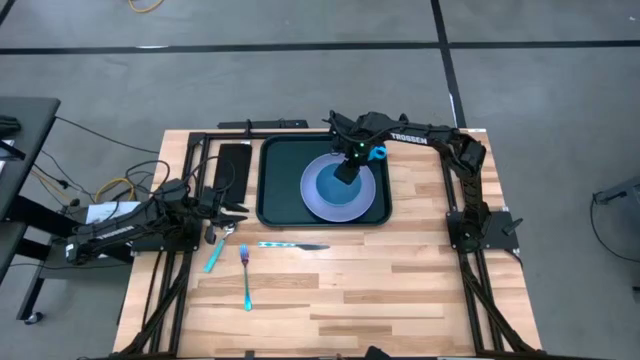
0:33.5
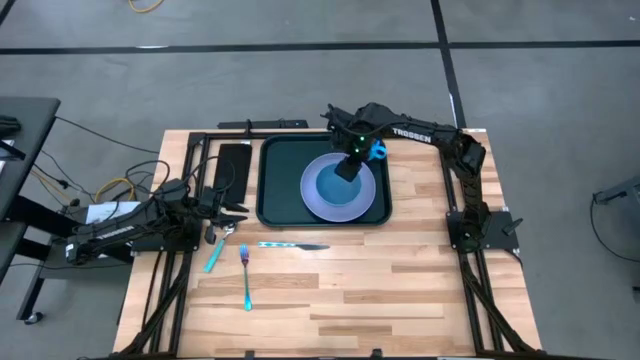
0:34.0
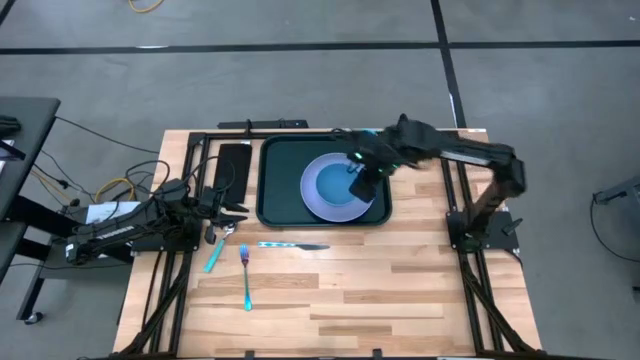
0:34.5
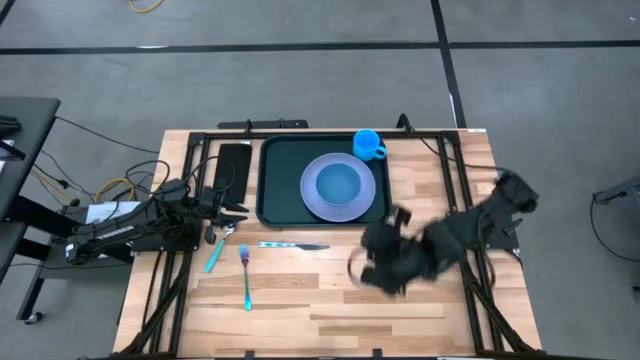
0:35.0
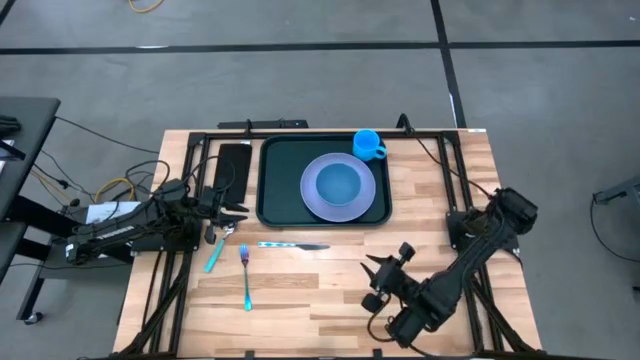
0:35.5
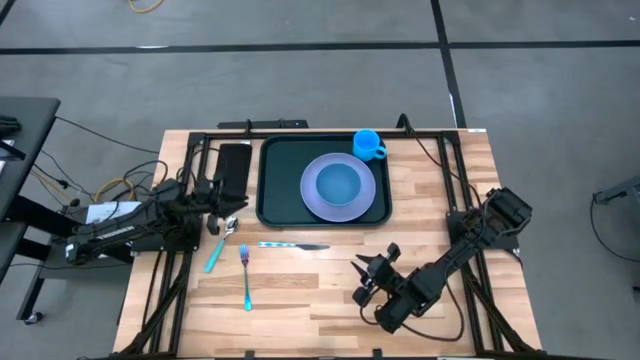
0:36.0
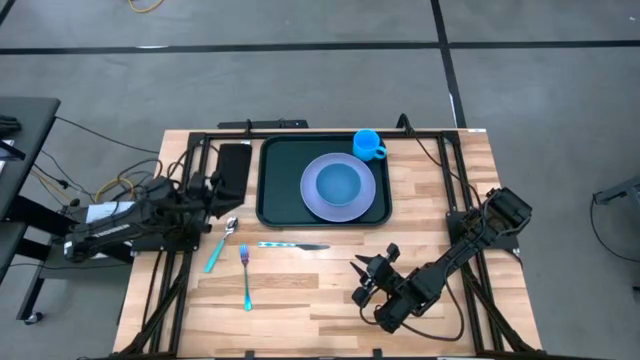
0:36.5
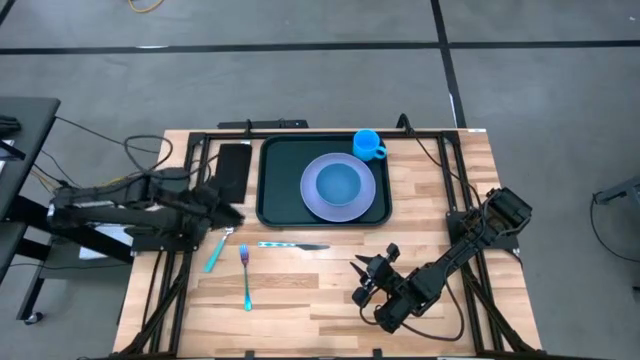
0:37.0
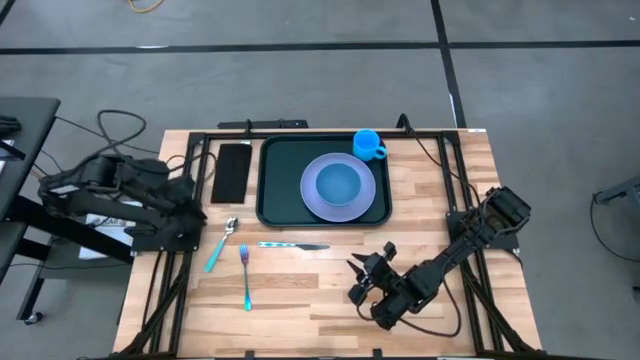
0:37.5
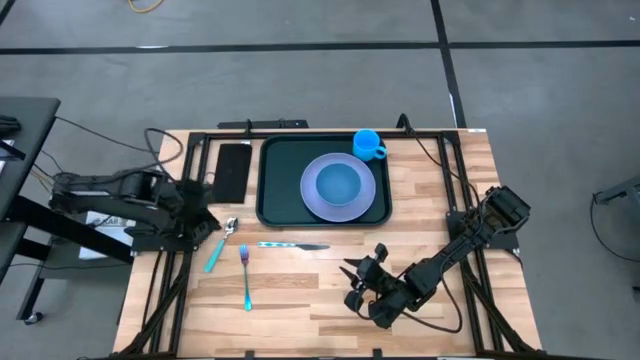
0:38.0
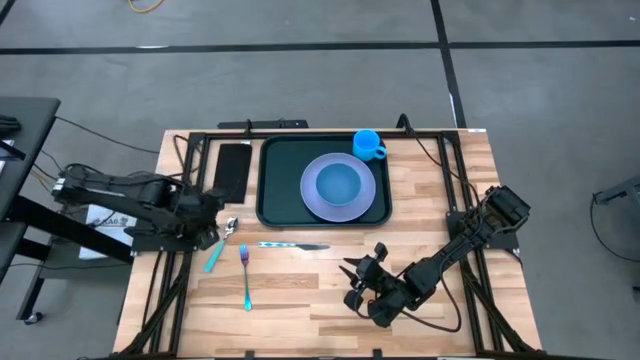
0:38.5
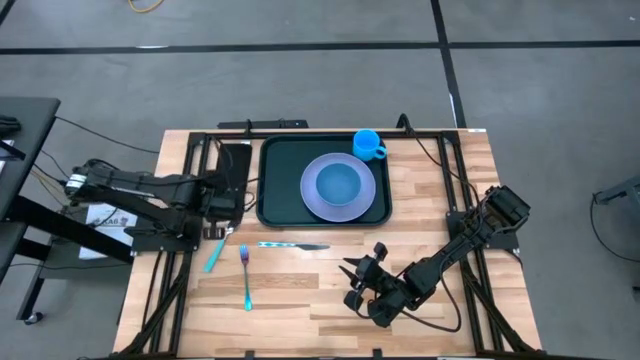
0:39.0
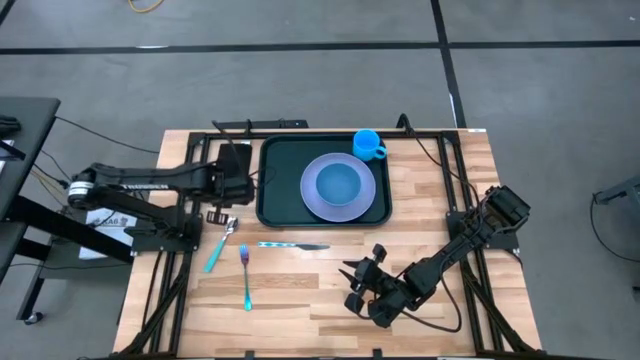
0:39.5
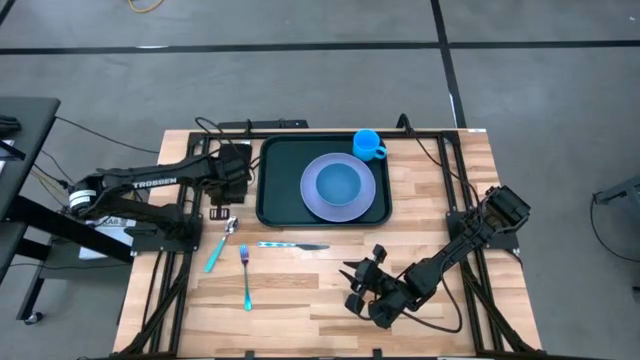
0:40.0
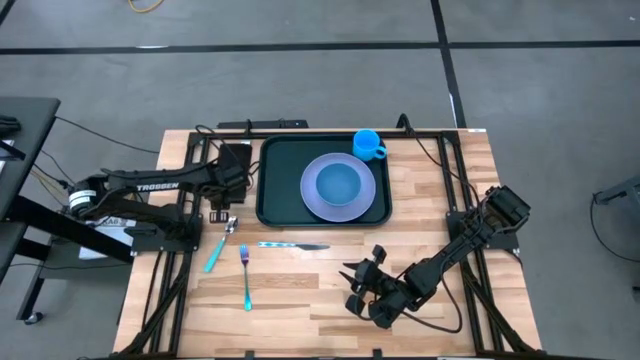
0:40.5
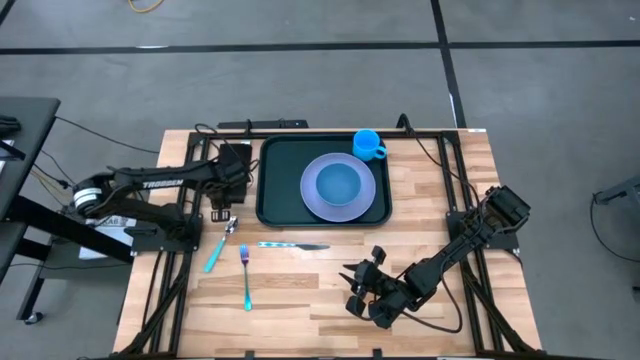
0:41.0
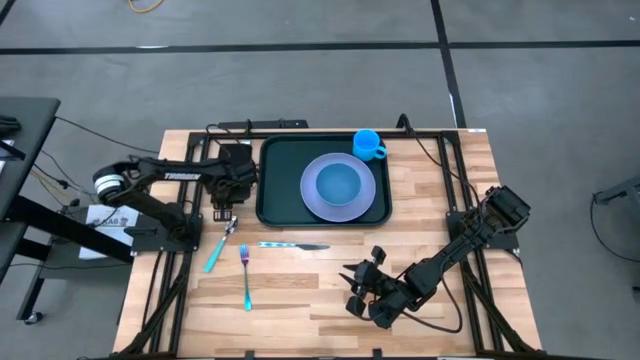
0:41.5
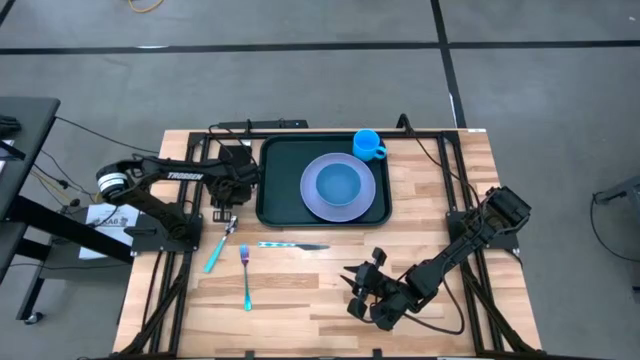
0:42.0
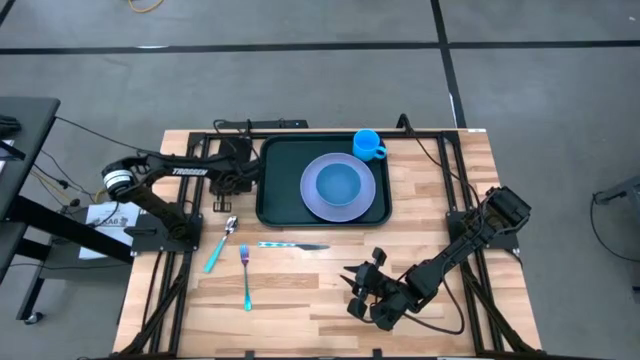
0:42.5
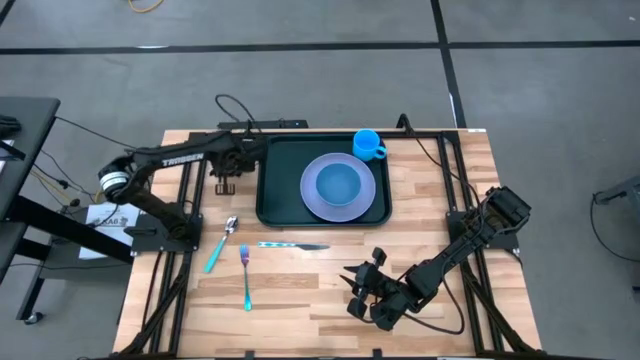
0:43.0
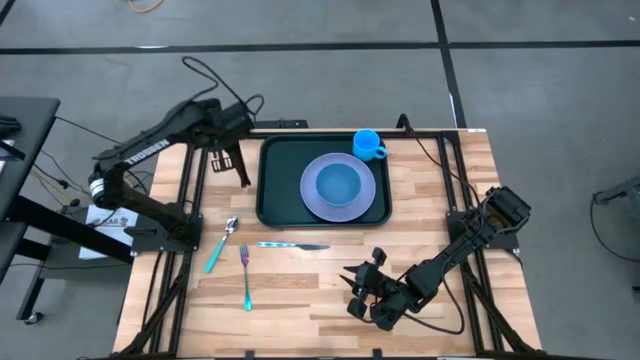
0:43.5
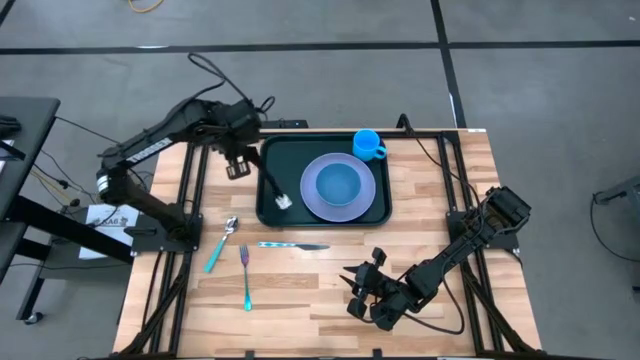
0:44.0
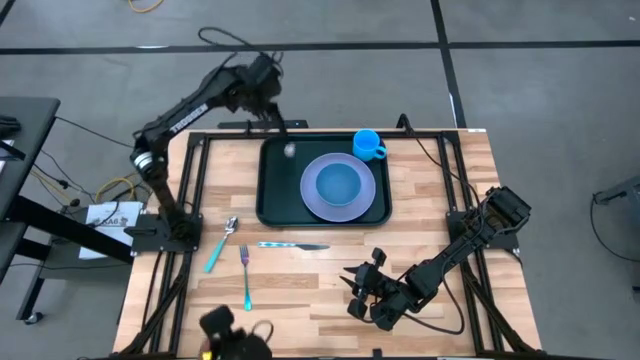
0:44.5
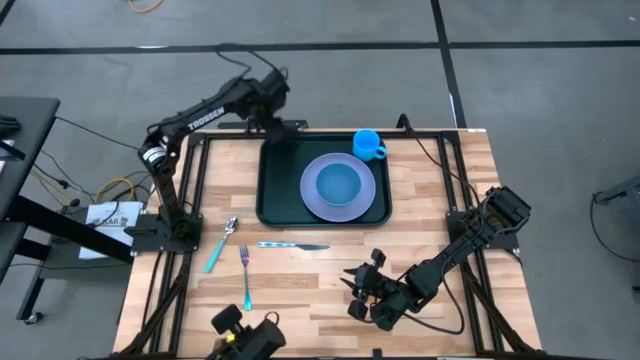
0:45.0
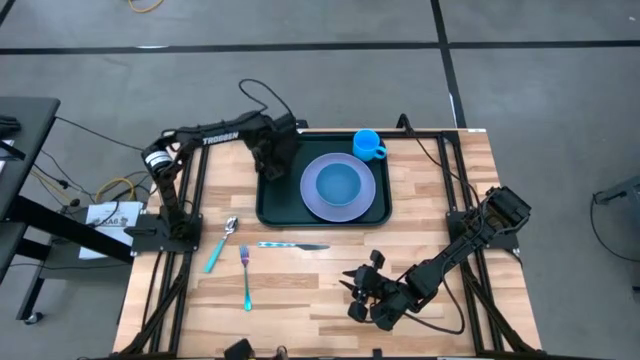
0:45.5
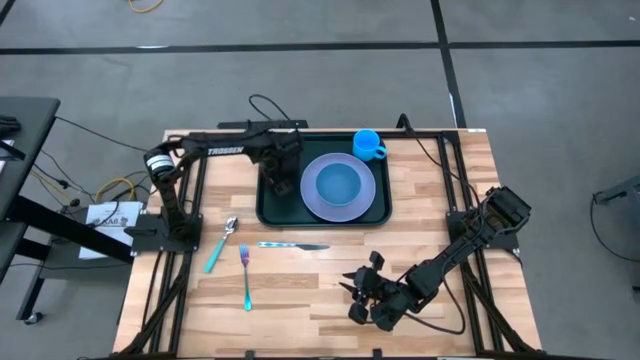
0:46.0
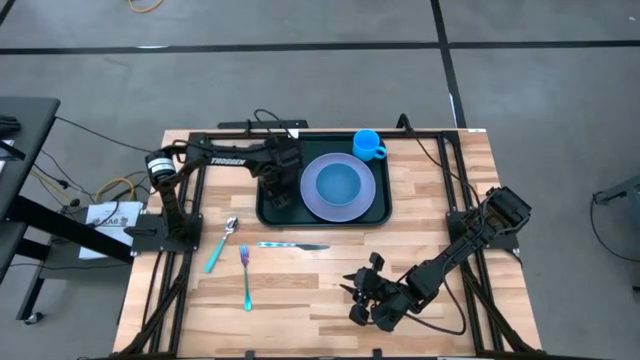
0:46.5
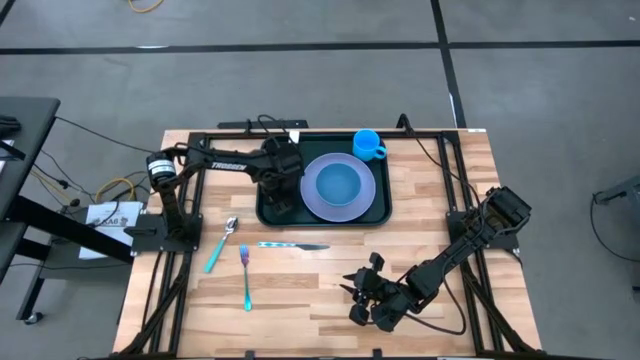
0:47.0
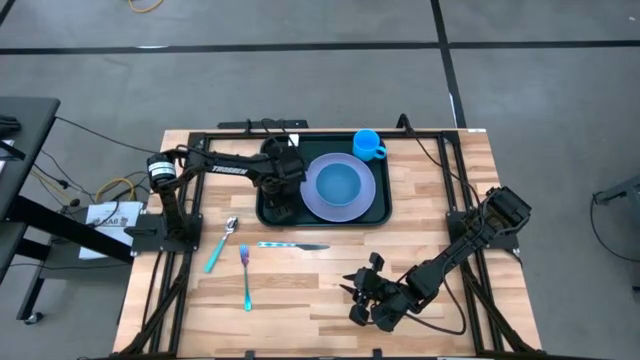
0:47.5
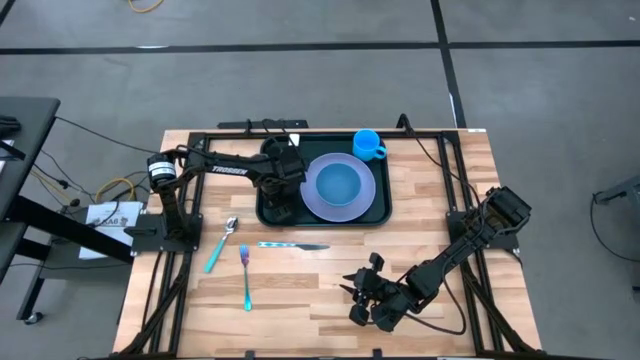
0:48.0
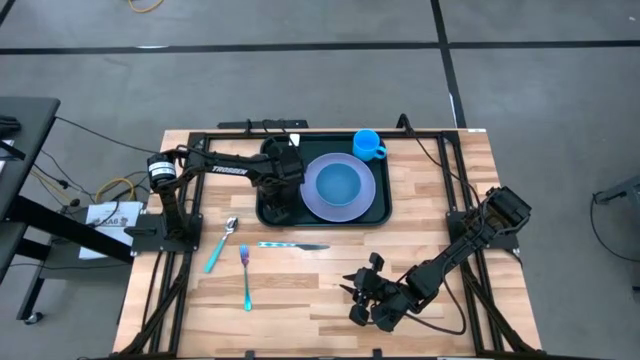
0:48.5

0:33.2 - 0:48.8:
Task: Set up tray
Put the black napkin on the black tray to the right of the purple plate

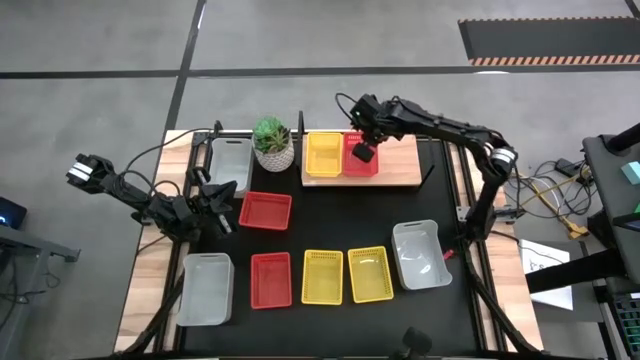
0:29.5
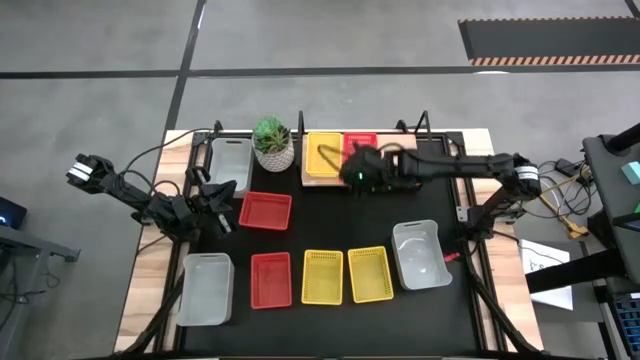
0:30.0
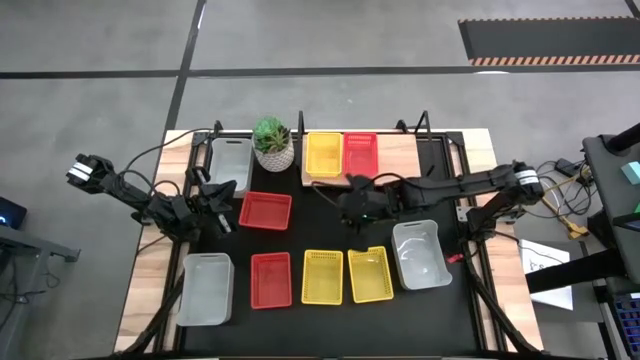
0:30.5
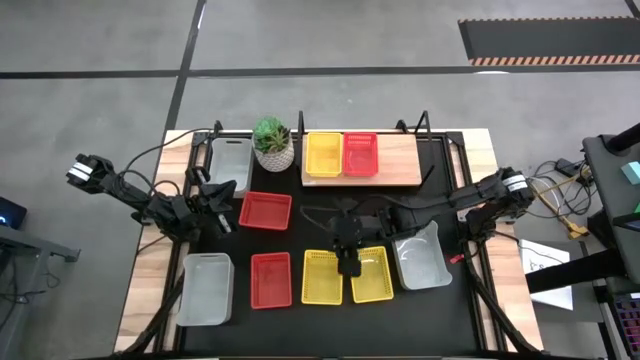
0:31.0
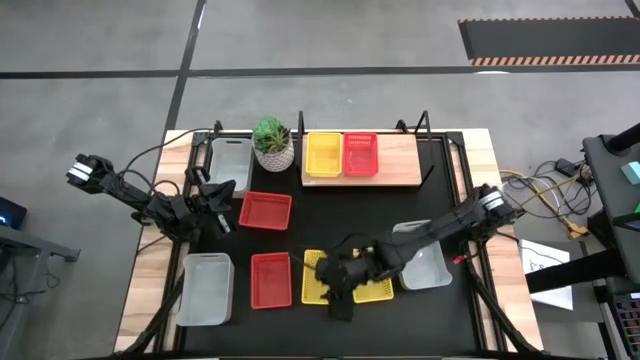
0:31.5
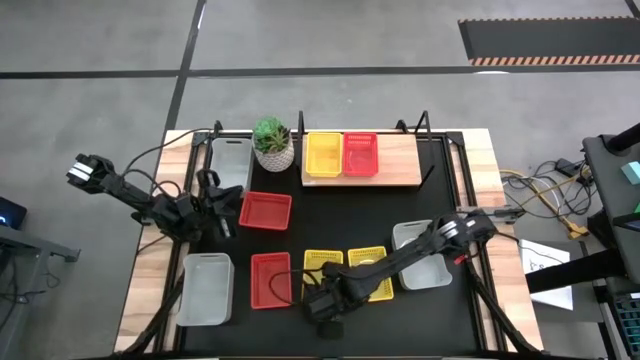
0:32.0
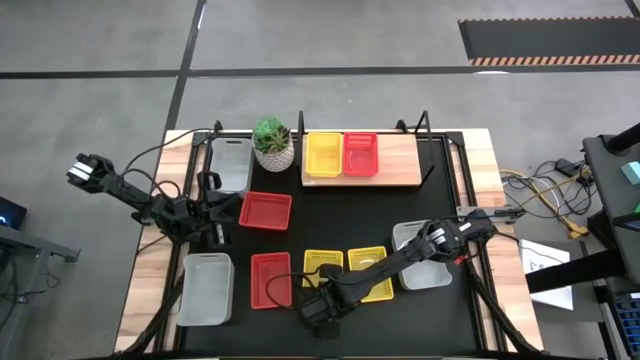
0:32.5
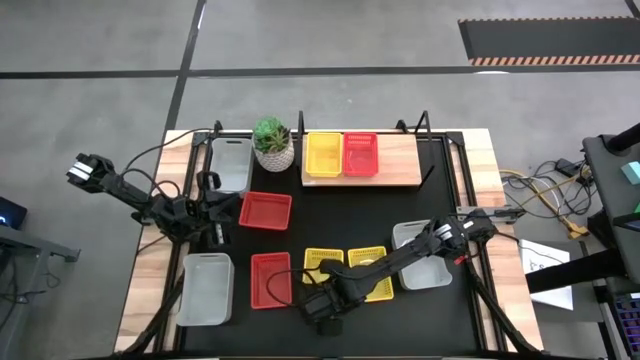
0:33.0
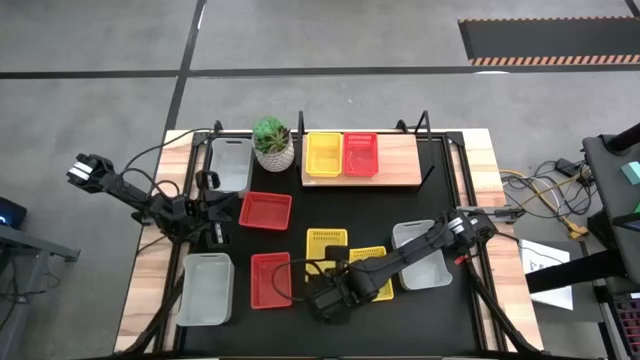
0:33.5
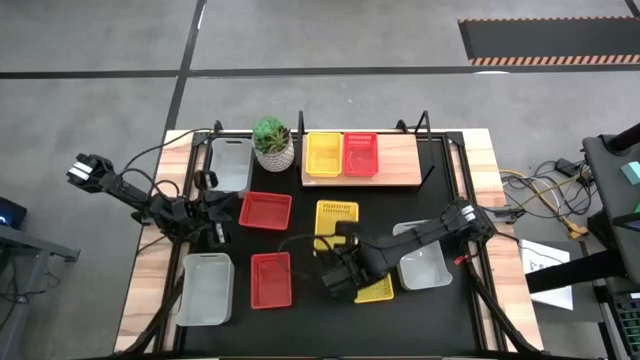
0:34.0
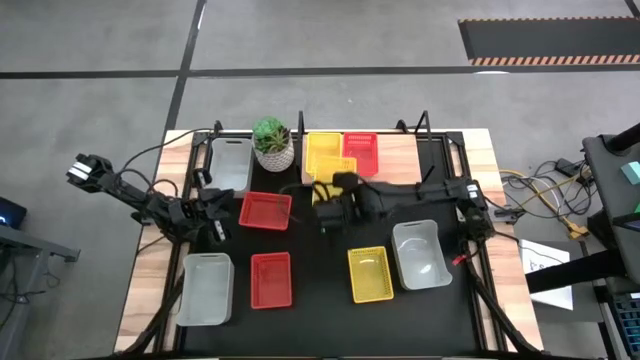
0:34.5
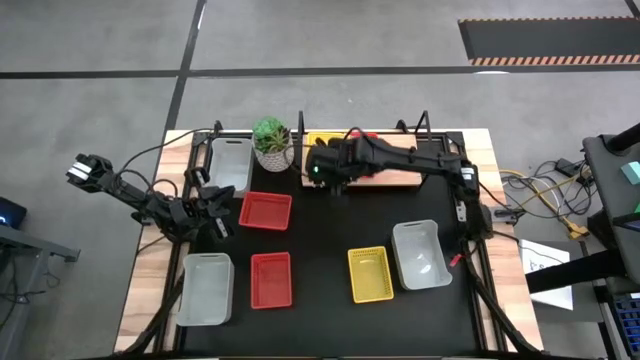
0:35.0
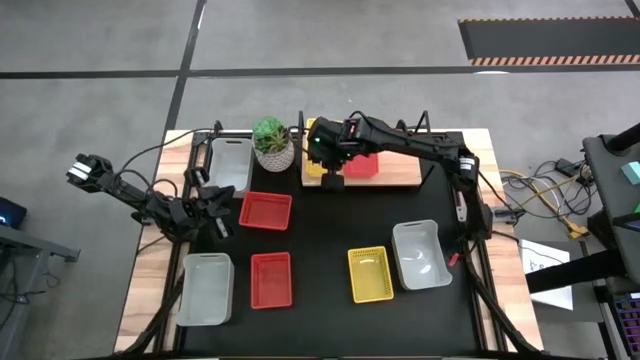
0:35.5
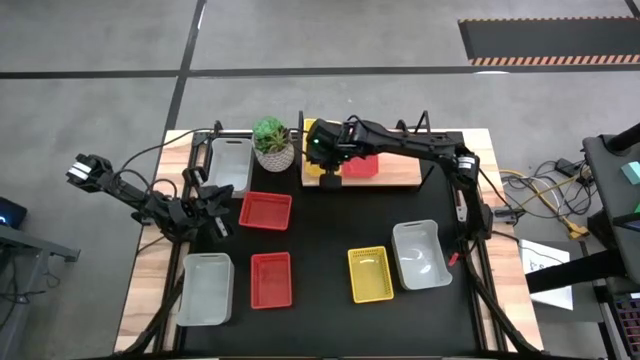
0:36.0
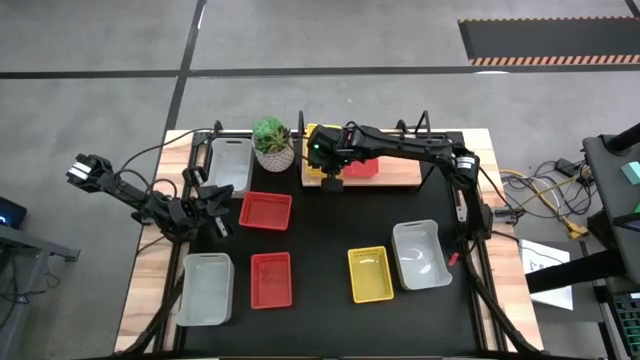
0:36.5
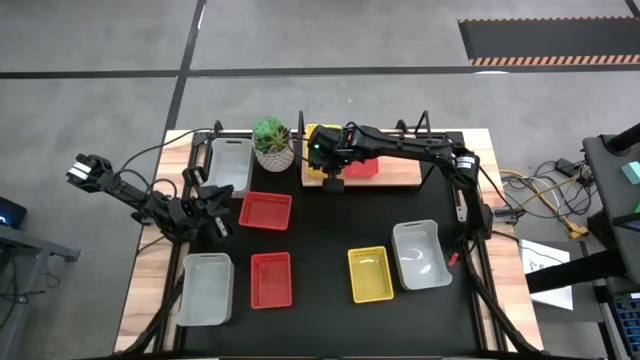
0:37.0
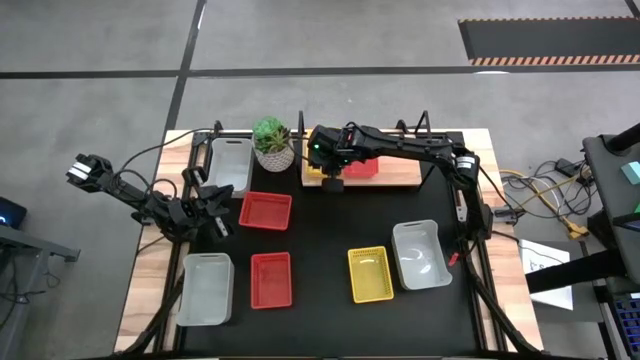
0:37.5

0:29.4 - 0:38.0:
Task: Stack baskets on shelf by color
Stack the left yellow bin on top of the yellow bin on the shelf
